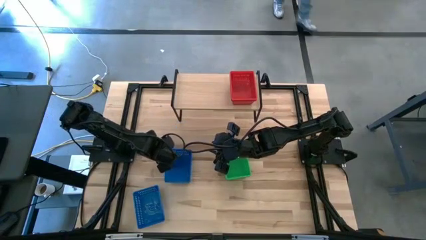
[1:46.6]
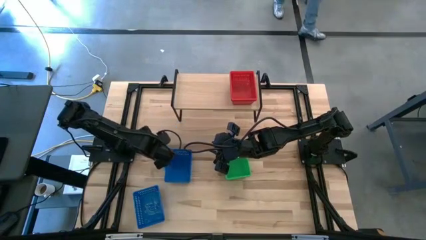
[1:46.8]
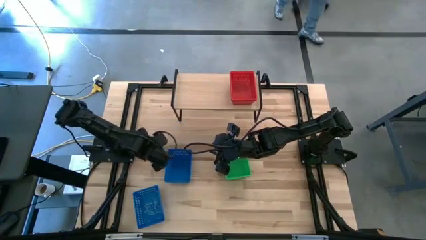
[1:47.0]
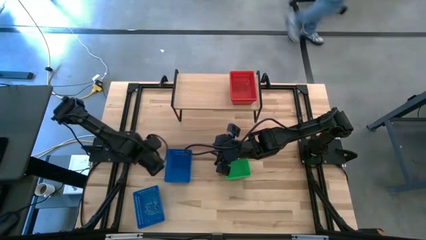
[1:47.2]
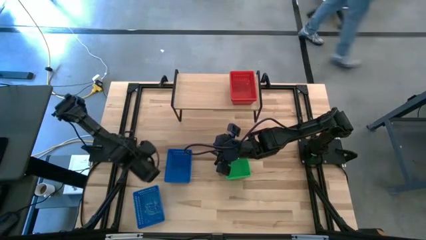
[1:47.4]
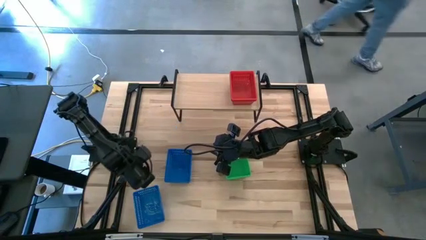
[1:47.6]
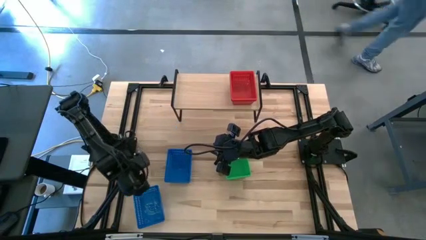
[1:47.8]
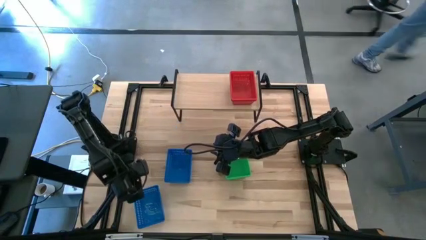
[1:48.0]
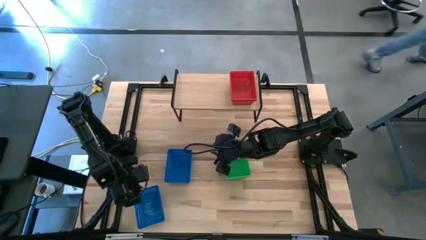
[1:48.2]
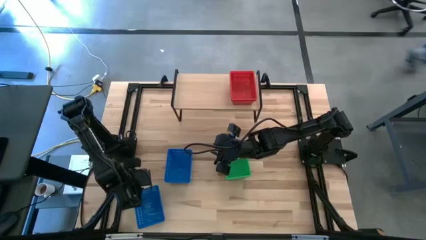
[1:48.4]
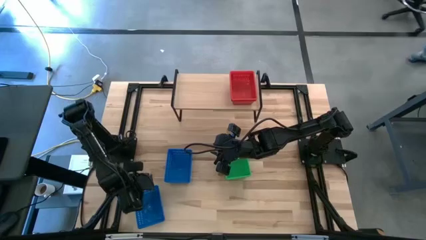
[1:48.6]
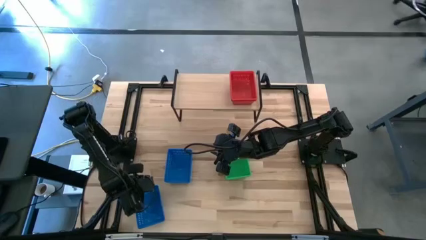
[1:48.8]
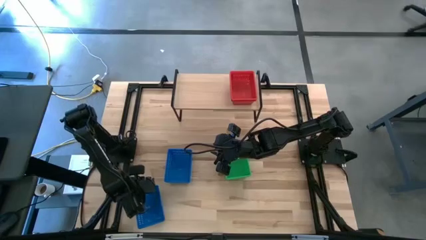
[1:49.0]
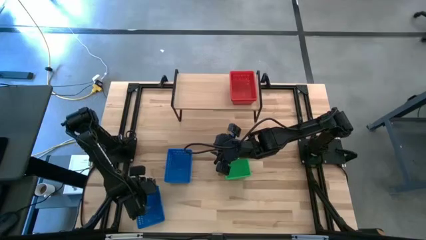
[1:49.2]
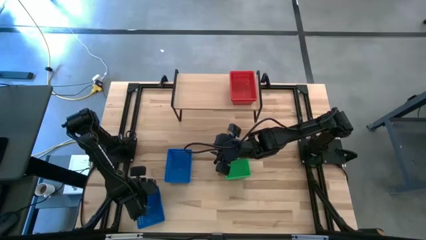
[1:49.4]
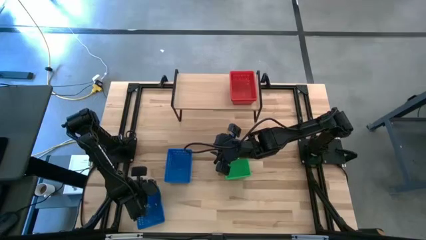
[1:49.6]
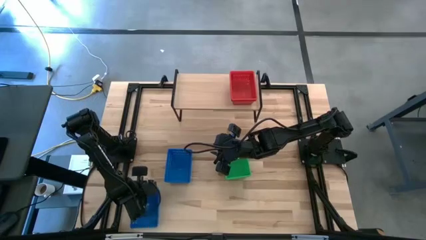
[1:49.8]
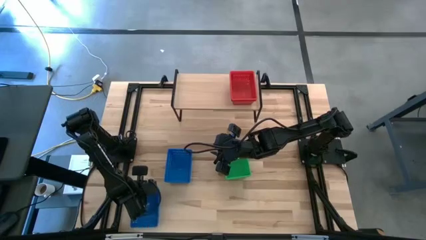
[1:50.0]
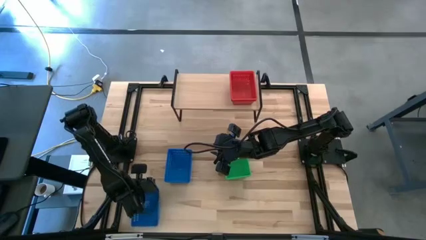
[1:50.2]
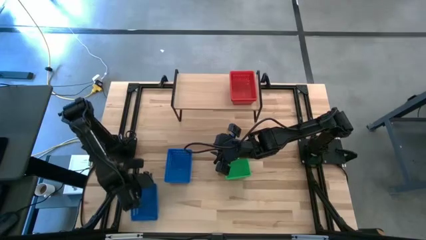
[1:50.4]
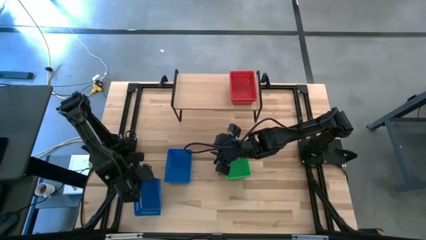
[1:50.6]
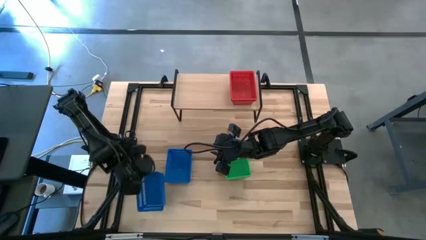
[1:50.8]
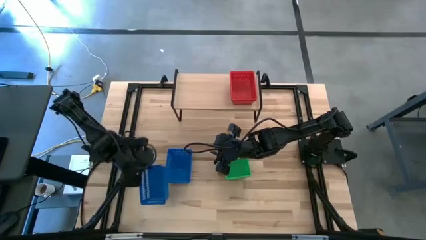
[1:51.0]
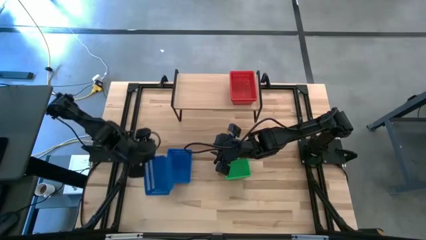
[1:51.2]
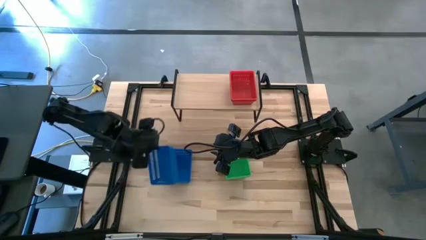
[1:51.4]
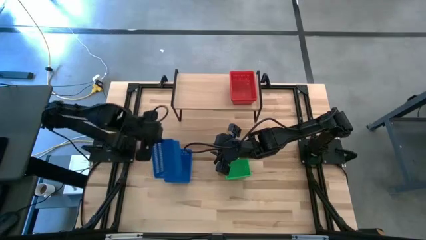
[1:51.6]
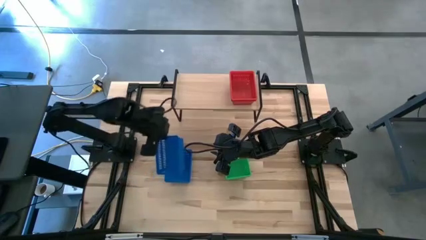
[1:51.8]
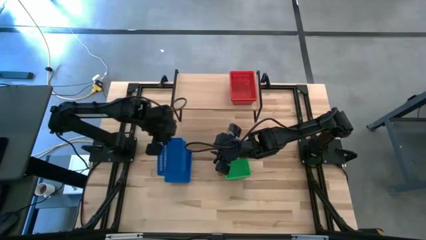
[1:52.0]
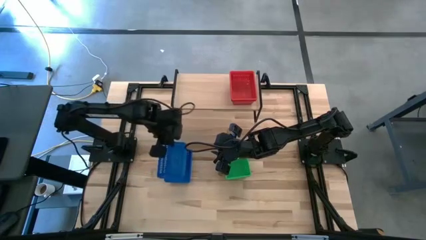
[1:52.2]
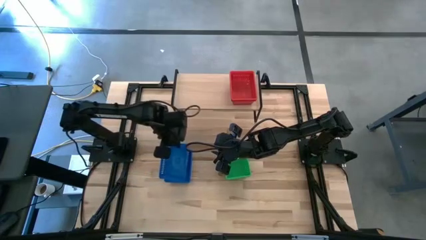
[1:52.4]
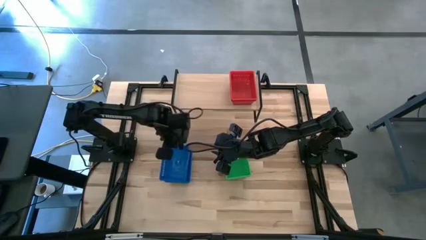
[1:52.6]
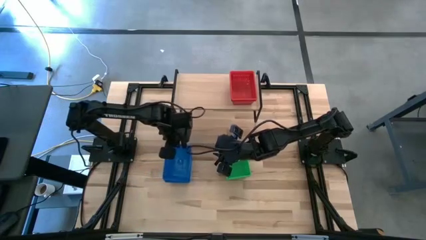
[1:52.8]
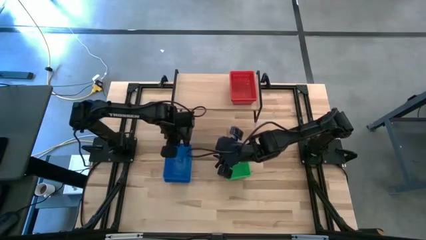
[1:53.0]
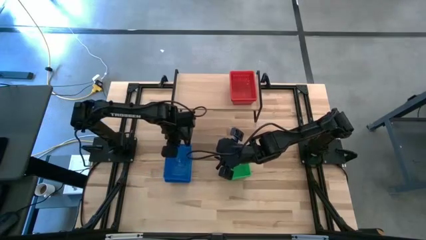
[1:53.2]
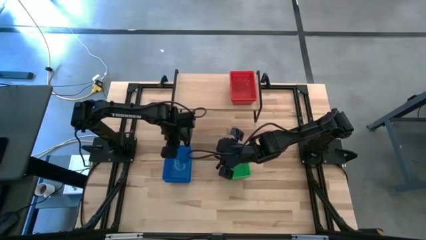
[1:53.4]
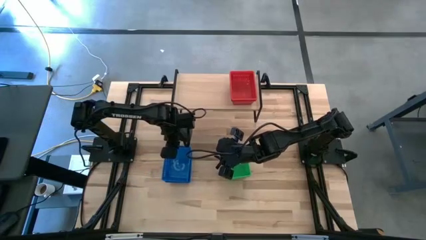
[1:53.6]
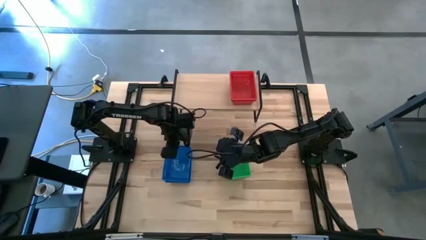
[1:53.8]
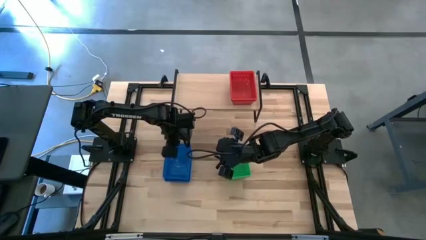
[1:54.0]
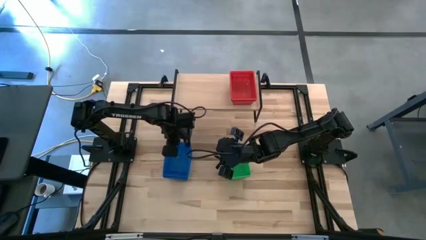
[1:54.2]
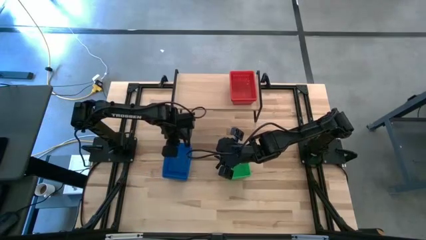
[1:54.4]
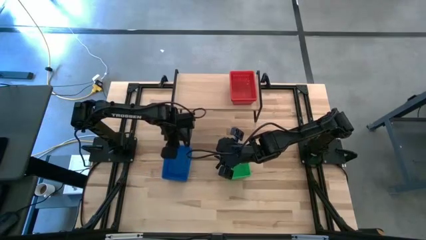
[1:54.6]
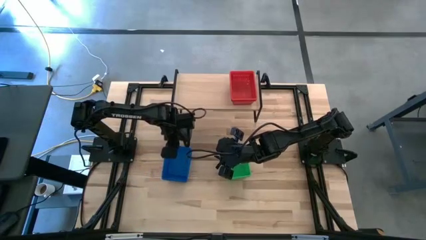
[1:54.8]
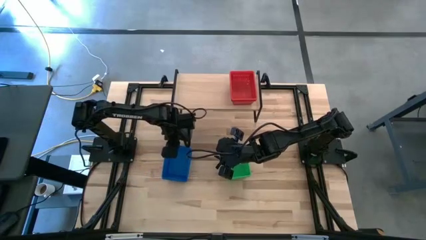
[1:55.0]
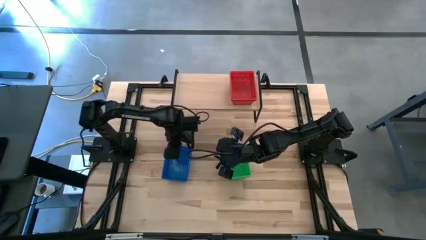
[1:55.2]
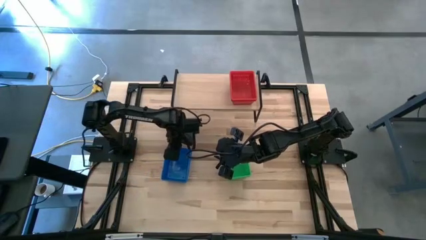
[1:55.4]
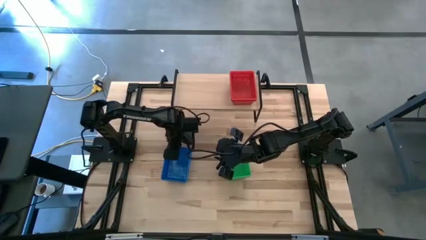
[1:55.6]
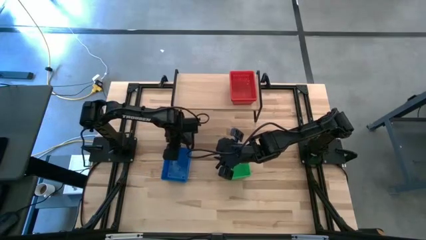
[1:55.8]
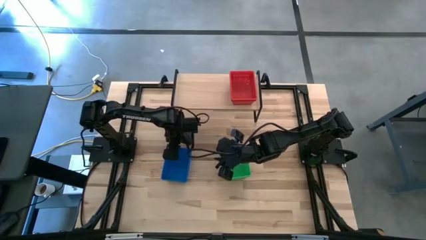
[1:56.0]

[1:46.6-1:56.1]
Task: Stack baskets on shelf by color
Stack the bottom blue basket on the top of the stacked blue baskets

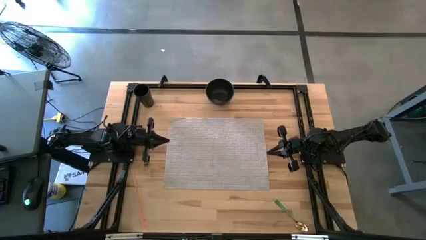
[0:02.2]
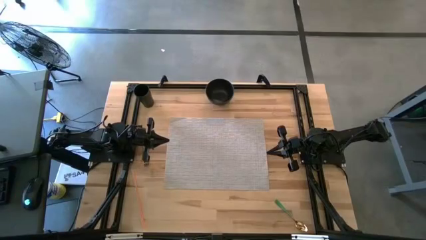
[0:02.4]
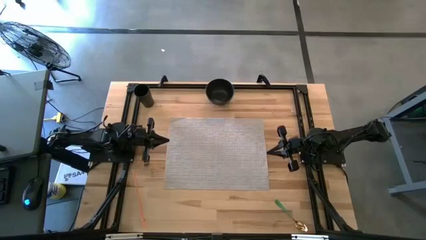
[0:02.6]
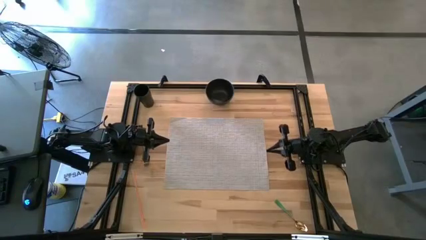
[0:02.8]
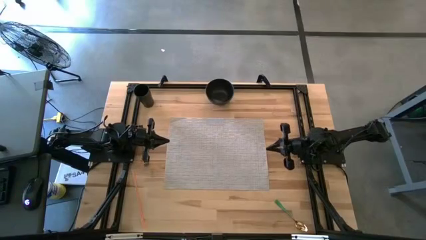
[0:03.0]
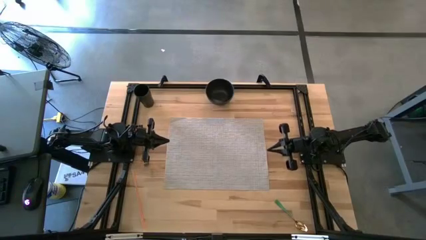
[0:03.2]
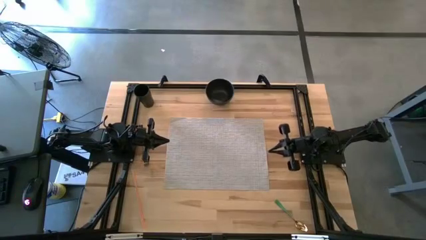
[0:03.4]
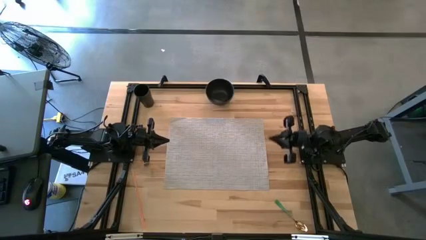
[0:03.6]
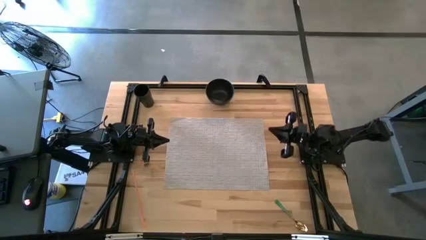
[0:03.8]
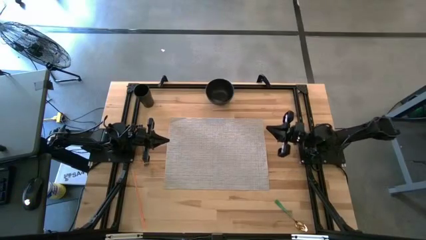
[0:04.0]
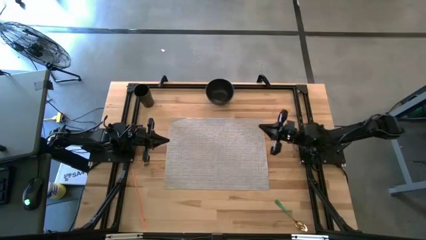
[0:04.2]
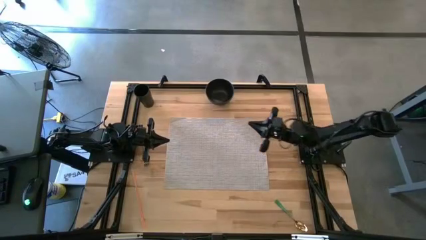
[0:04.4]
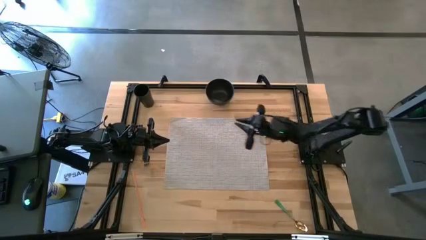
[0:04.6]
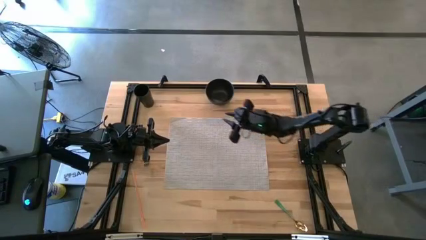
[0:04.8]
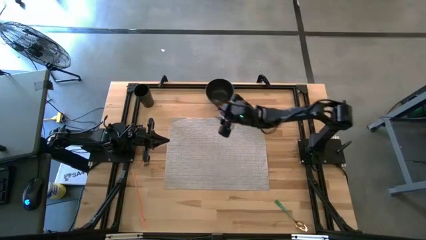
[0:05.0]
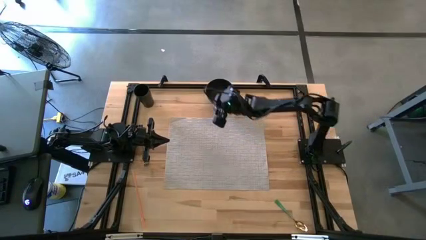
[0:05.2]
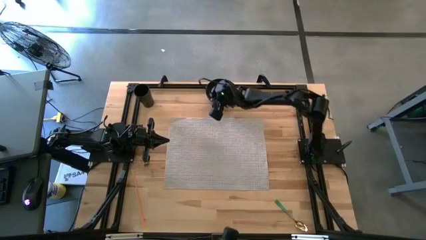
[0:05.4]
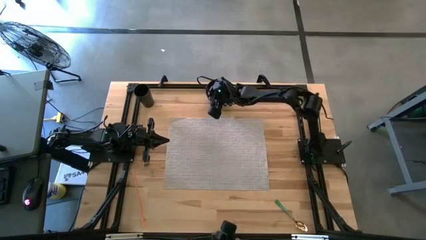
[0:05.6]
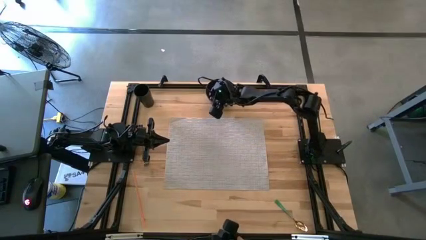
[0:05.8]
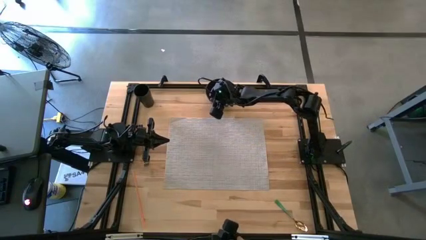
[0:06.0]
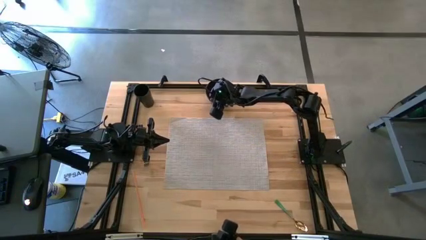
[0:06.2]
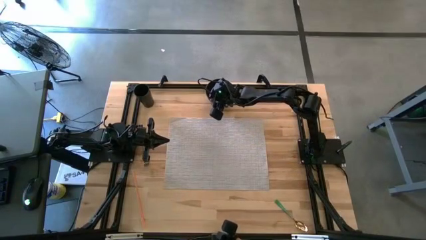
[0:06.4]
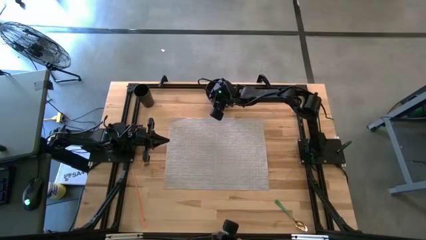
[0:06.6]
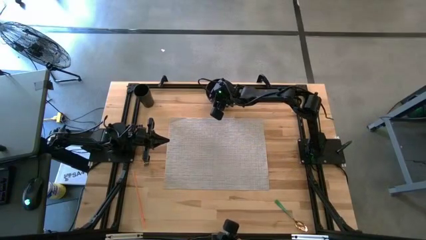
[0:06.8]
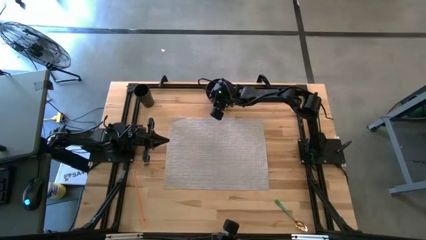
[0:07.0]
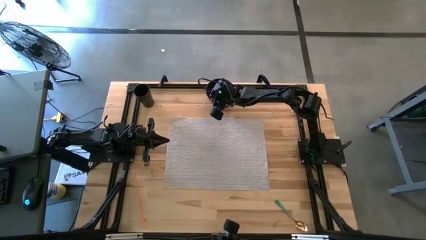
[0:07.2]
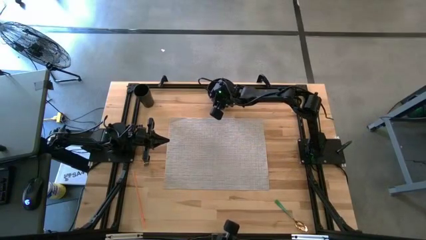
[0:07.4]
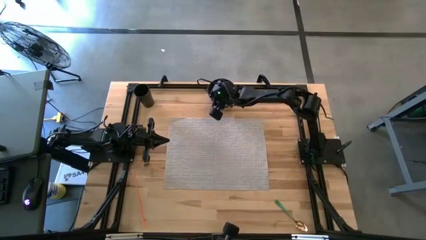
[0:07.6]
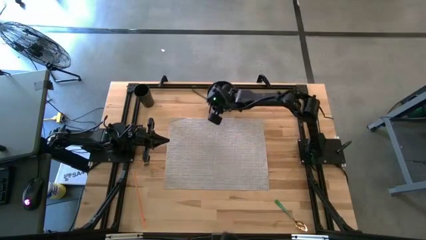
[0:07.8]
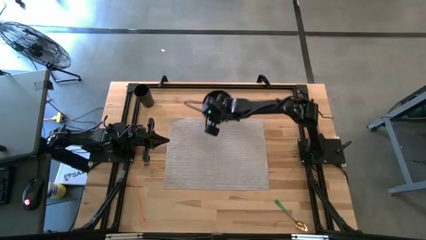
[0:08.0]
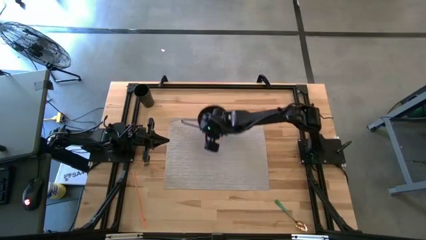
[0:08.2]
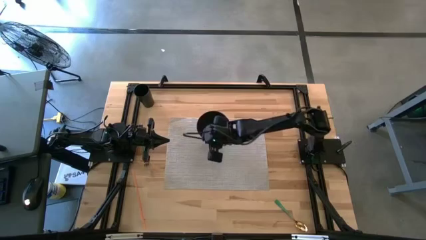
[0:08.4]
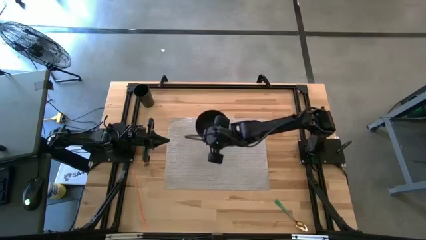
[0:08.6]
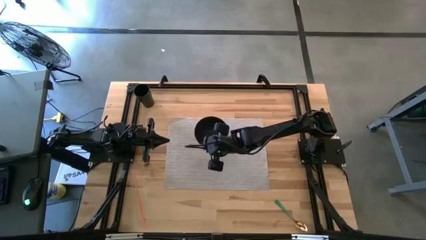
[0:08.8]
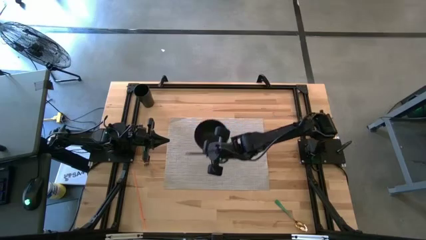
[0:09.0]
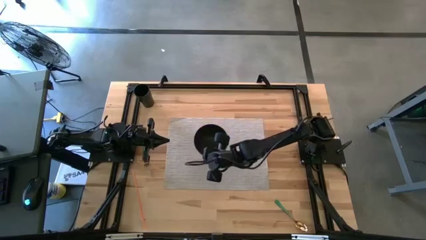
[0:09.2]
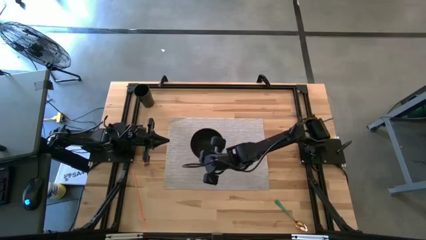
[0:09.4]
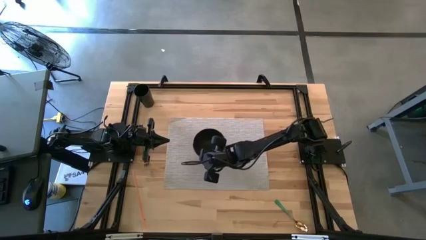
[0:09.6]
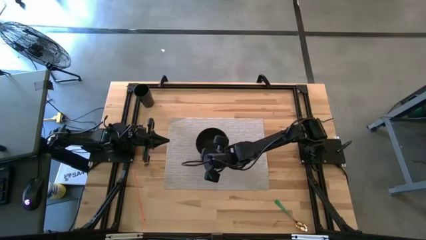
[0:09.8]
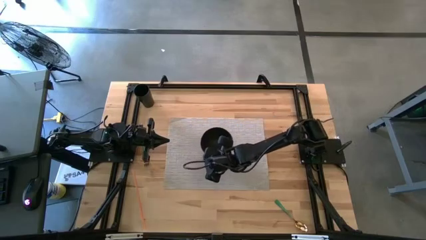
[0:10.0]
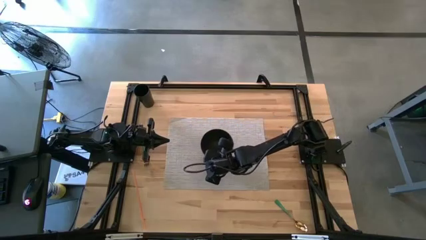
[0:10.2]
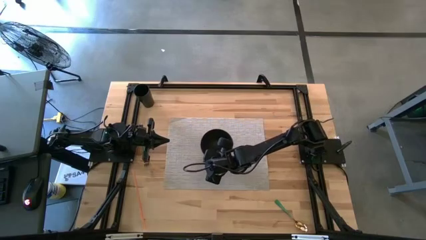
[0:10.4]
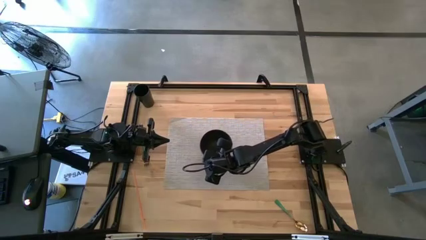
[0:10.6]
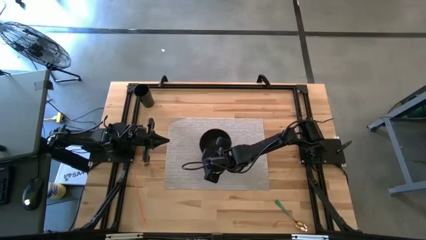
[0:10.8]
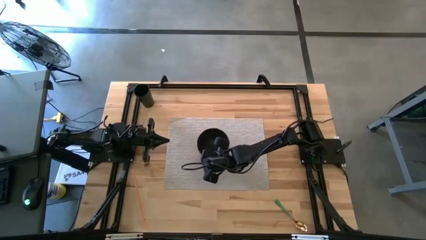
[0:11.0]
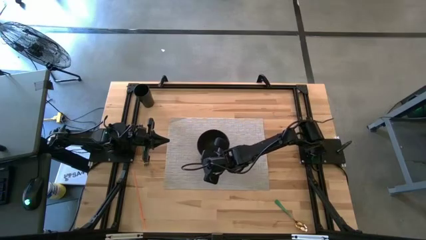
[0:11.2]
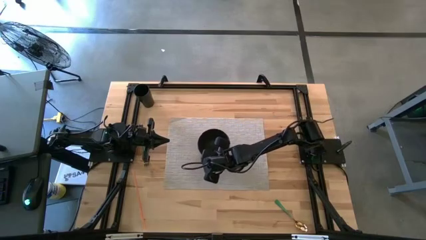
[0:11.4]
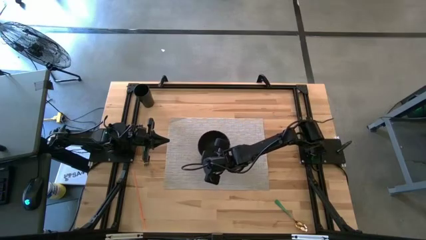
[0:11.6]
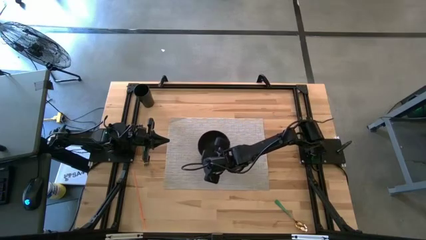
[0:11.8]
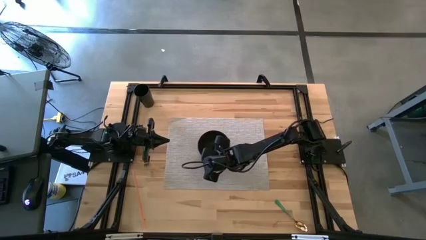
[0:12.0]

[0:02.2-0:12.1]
Task: Pick & Place Utensil
Put the black bowl in the center of the gray mat
